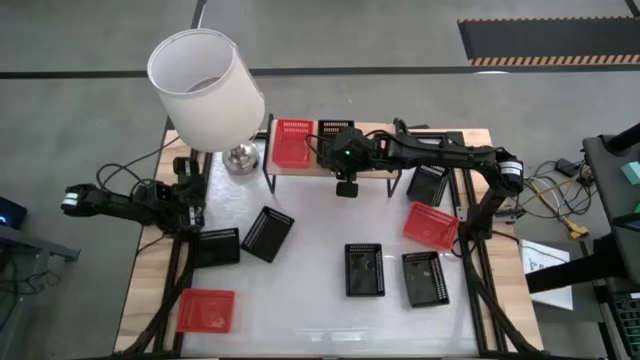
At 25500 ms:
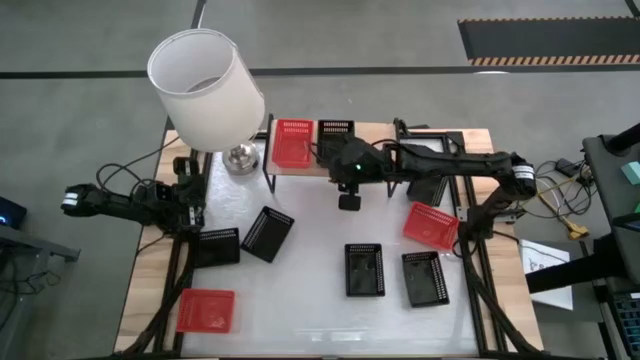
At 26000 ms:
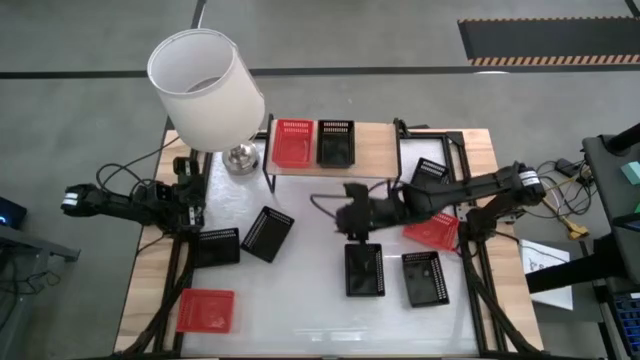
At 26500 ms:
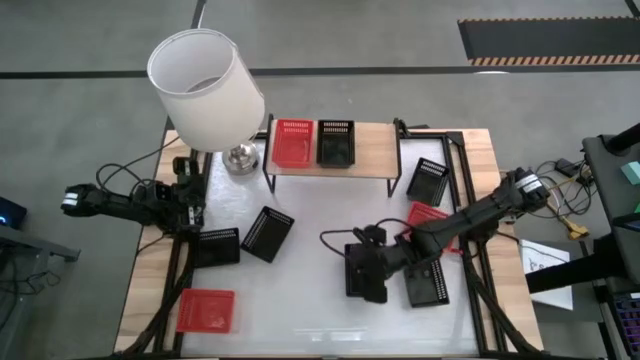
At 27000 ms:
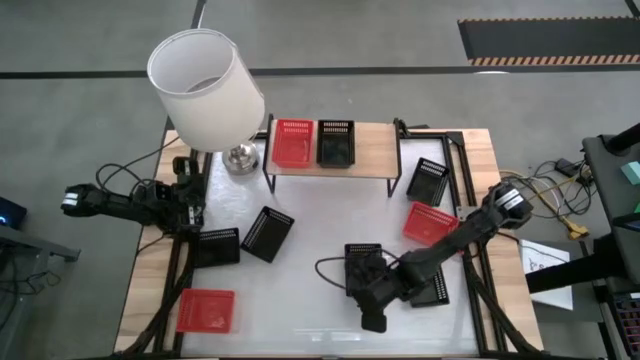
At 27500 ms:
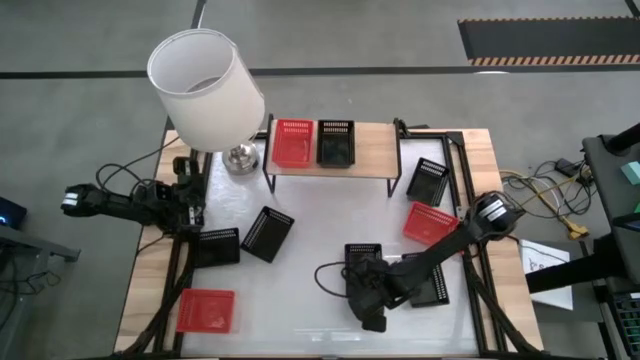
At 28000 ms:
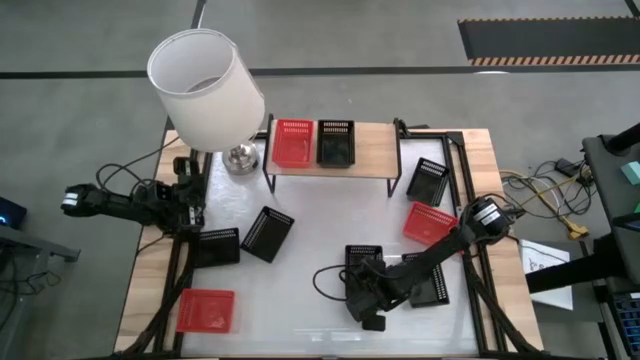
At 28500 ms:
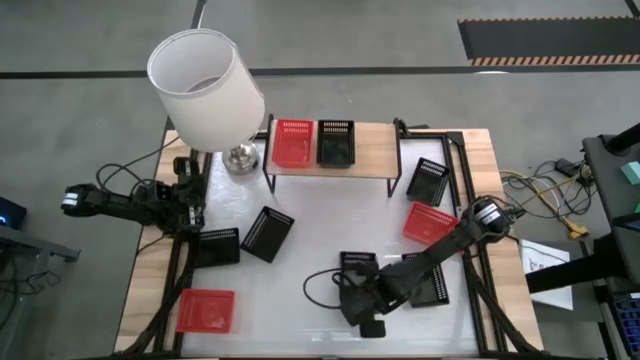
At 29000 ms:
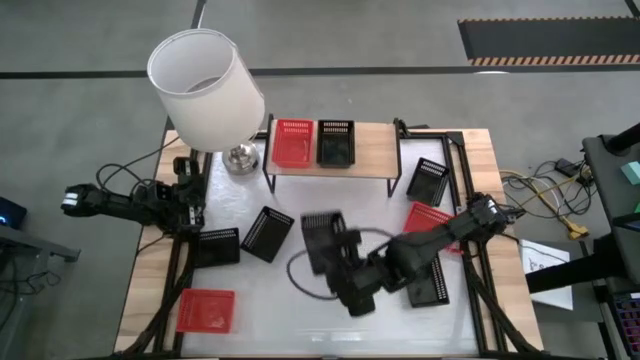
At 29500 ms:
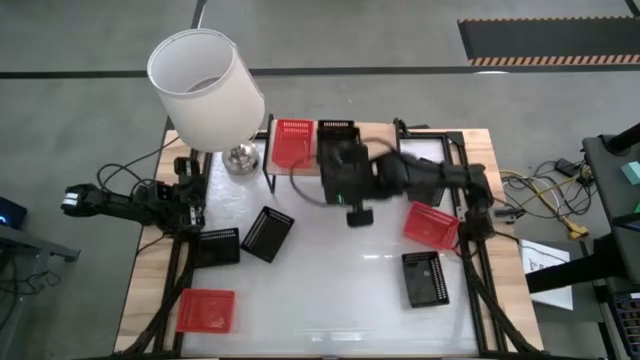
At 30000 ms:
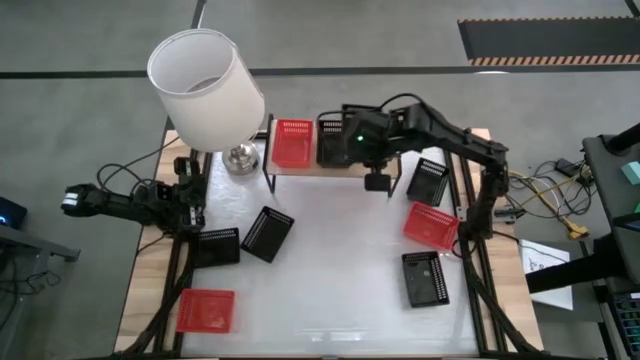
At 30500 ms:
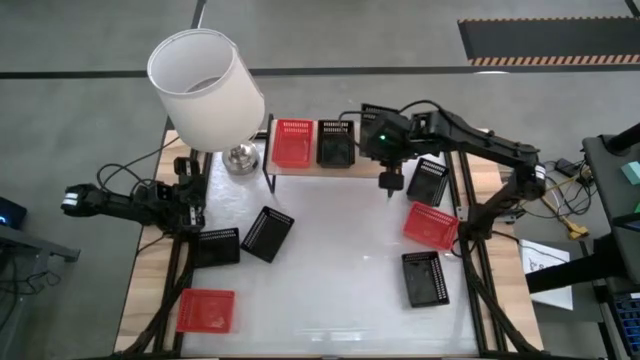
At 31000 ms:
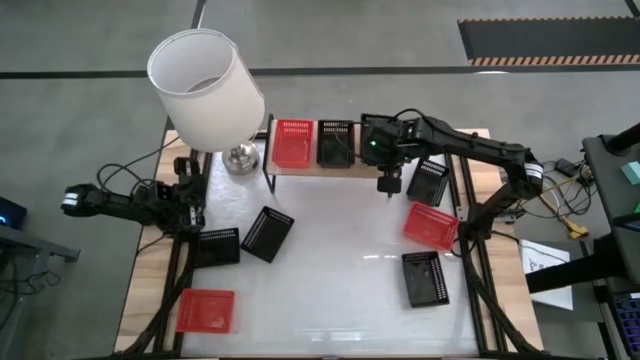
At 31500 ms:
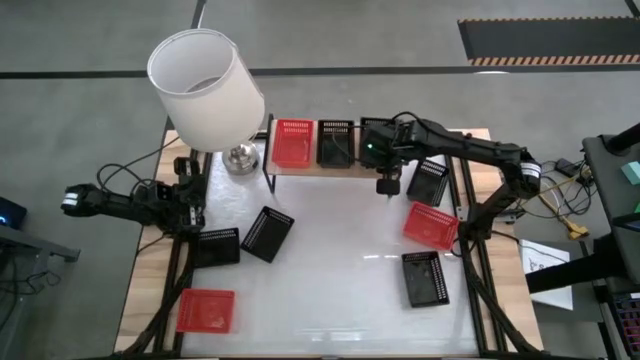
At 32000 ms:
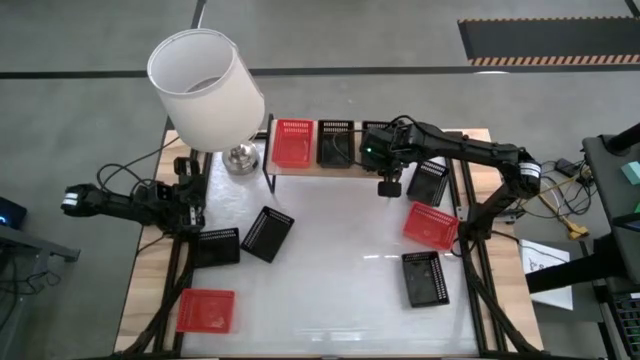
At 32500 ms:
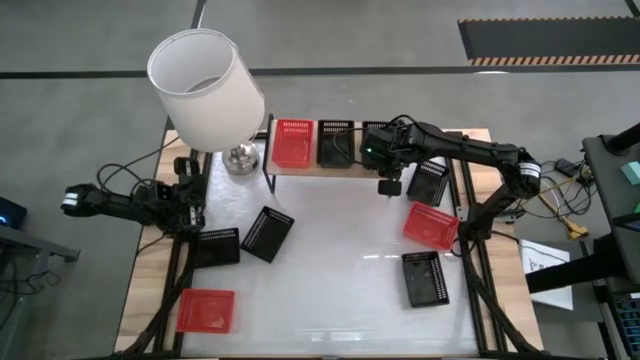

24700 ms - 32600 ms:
Put the black basket on the shelf

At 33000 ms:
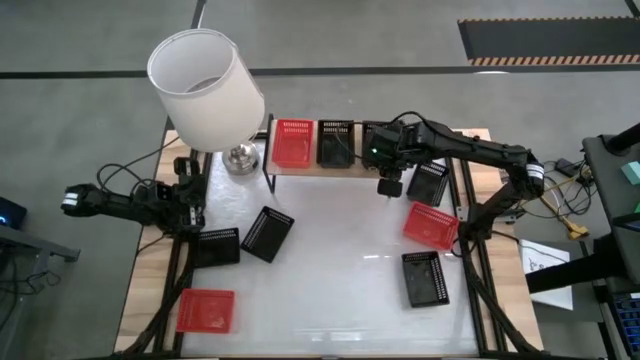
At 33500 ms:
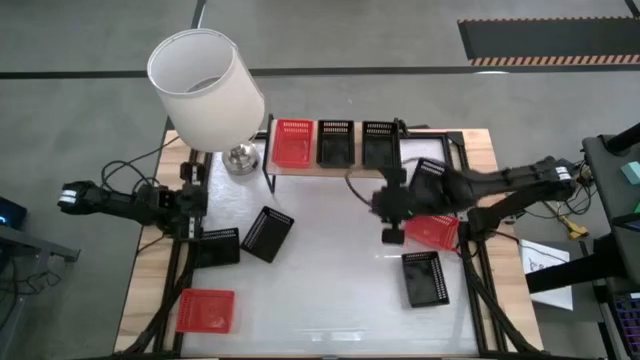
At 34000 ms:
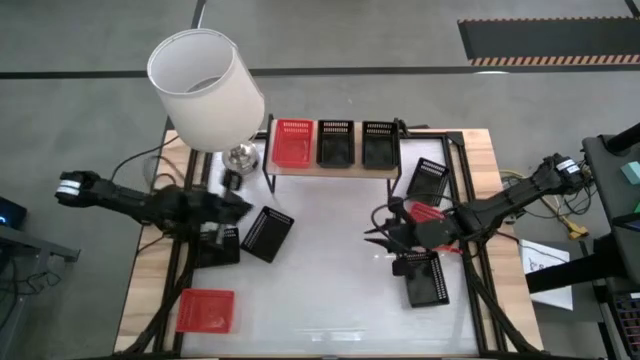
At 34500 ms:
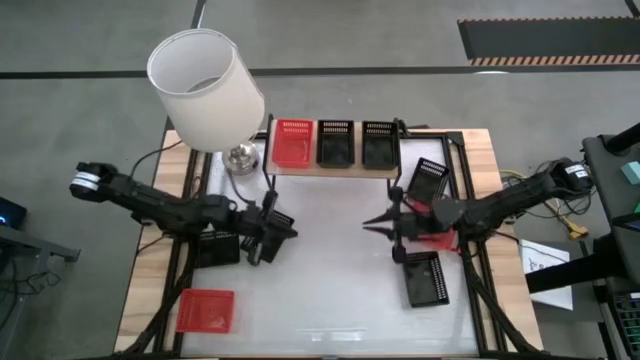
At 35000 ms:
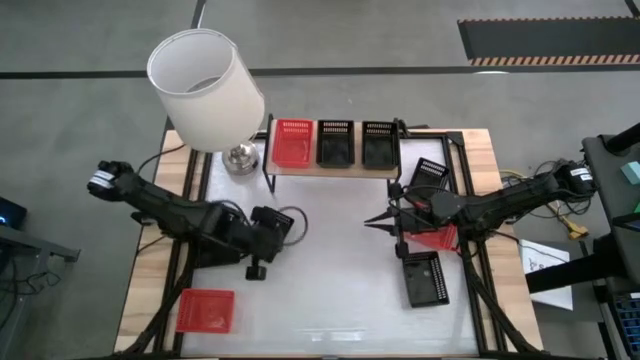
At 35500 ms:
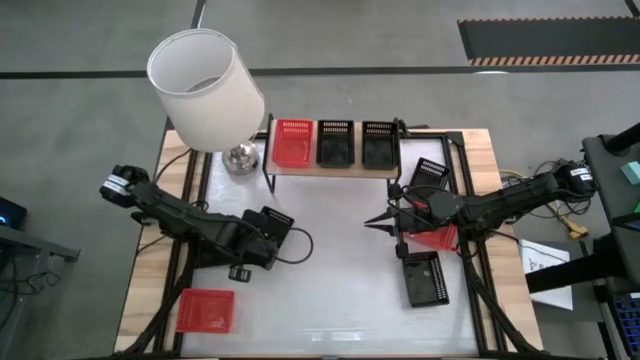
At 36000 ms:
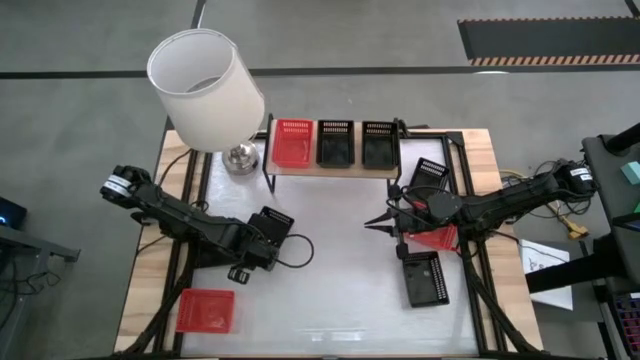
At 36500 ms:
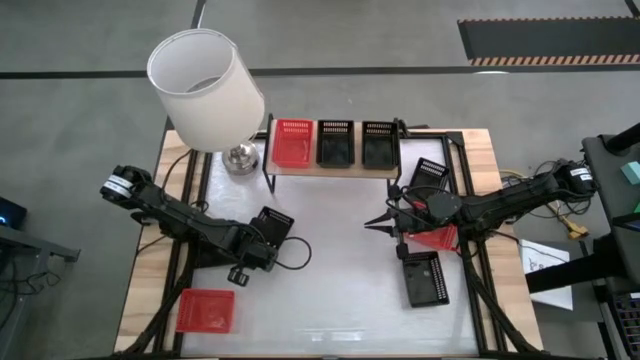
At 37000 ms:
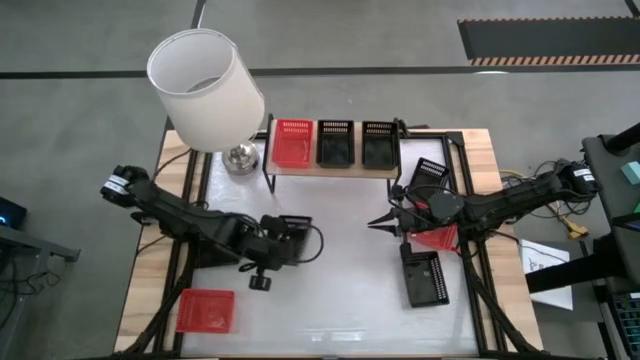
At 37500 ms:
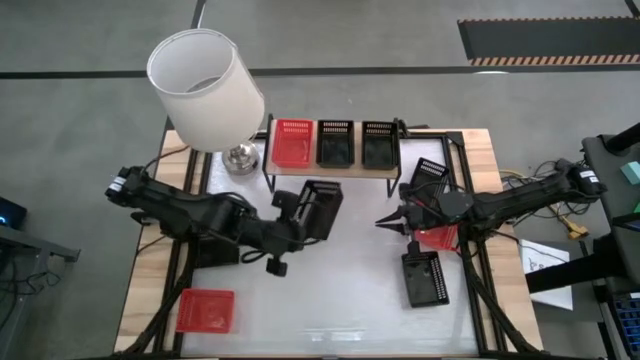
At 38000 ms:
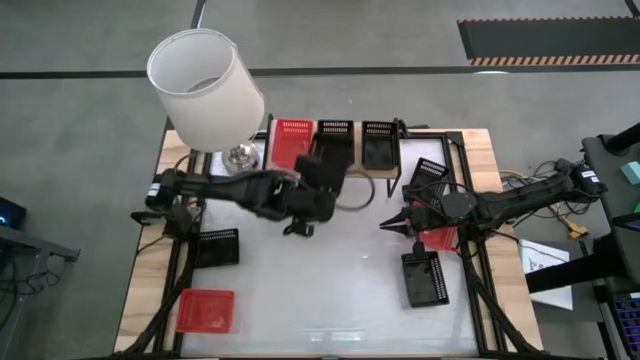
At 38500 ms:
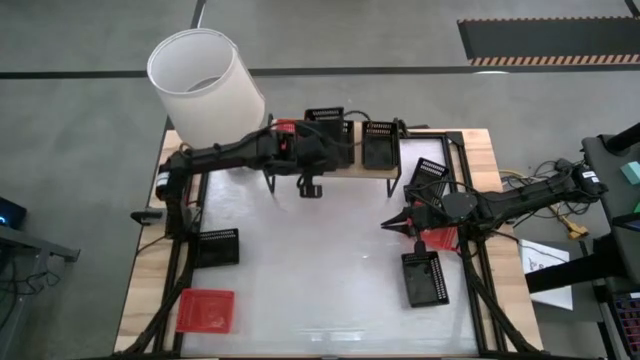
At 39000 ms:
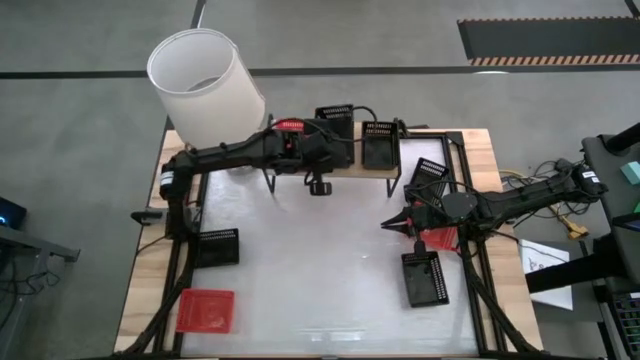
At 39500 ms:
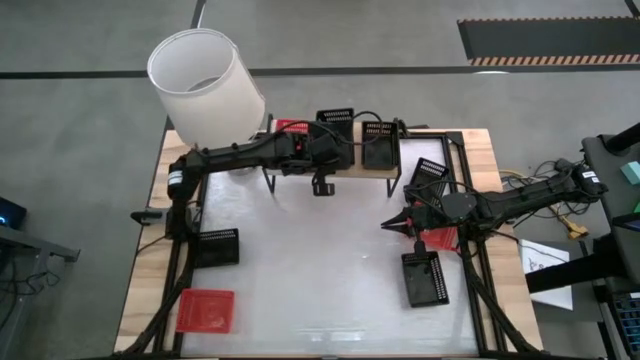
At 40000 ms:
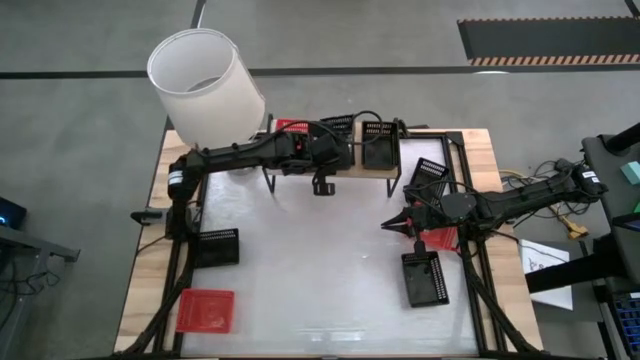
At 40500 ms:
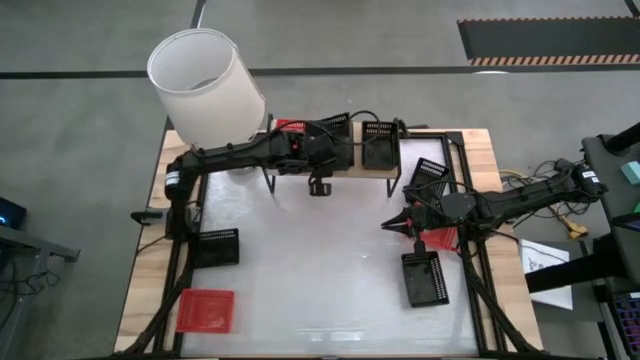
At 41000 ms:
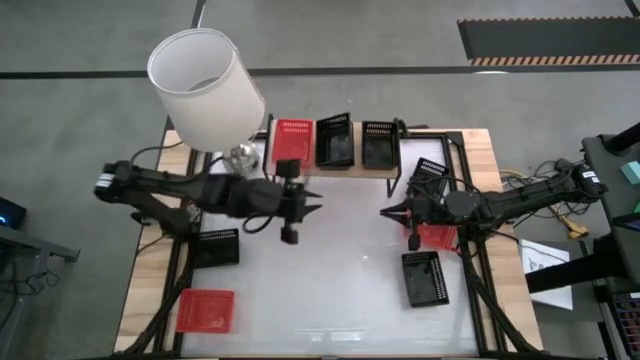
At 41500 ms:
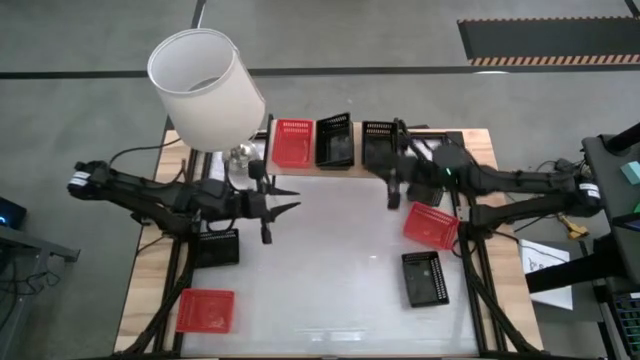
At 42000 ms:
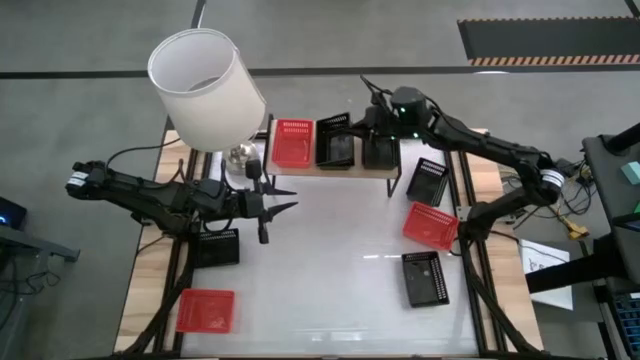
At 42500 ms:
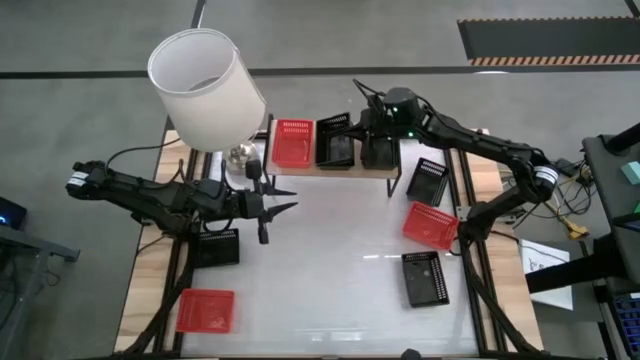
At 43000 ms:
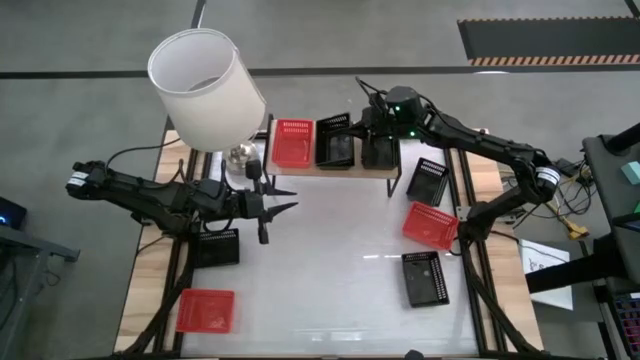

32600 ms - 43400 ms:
Stack the black basket into the other black basket on the shelf

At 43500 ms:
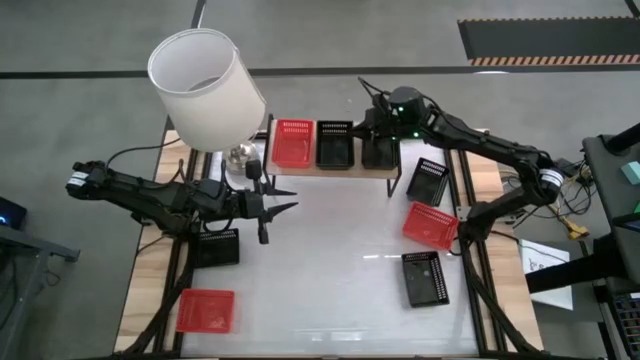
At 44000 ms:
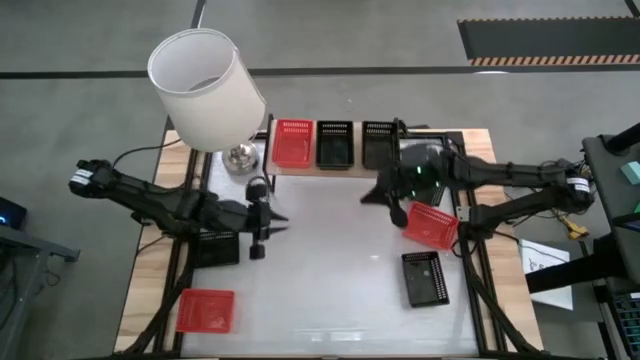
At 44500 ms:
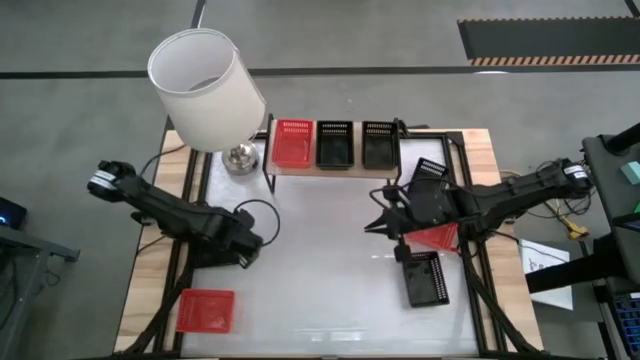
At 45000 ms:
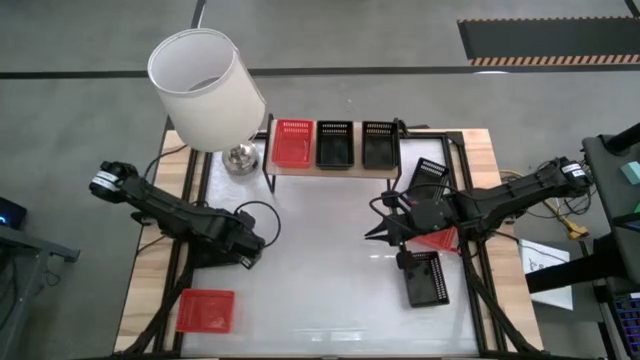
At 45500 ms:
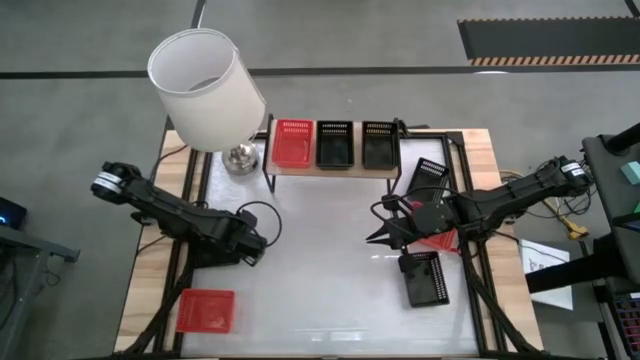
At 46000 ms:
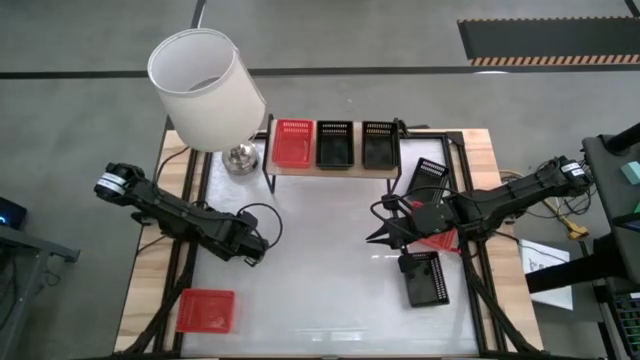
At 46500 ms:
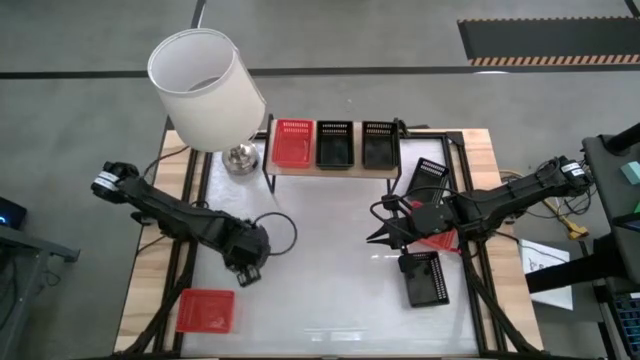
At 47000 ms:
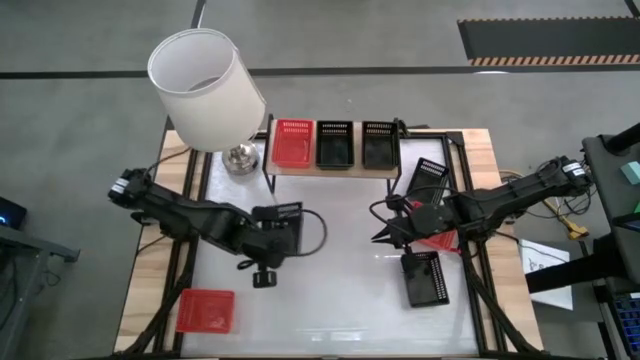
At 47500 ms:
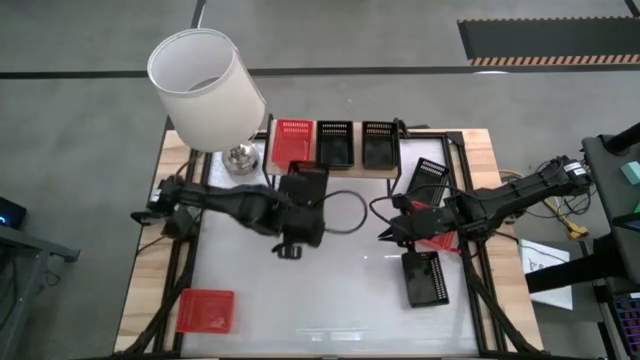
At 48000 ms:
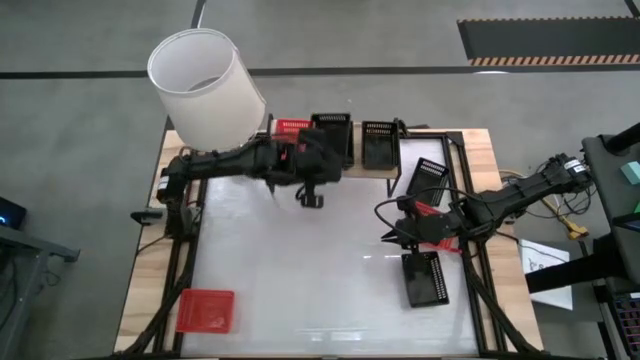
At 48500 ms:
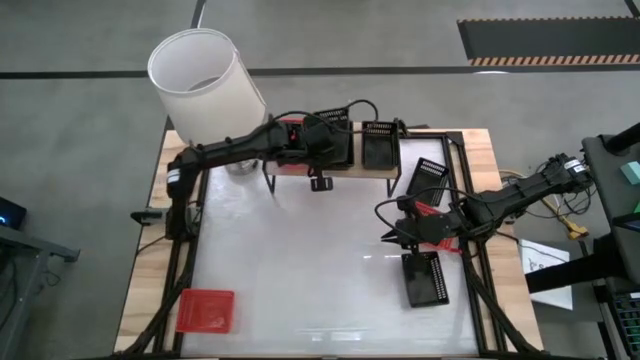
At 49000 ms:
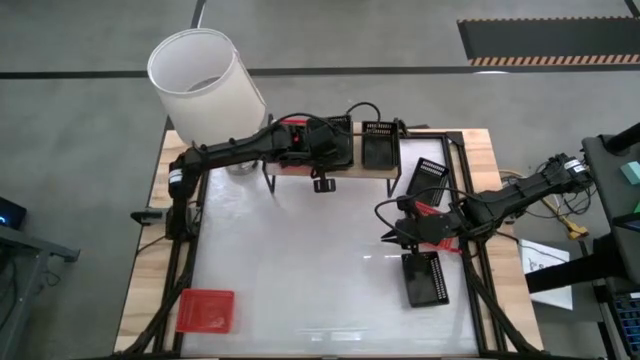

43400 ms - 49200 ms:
Stack the black basket into the other black basket on the shelf
